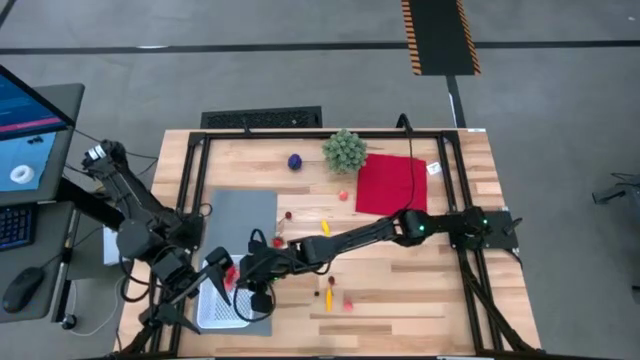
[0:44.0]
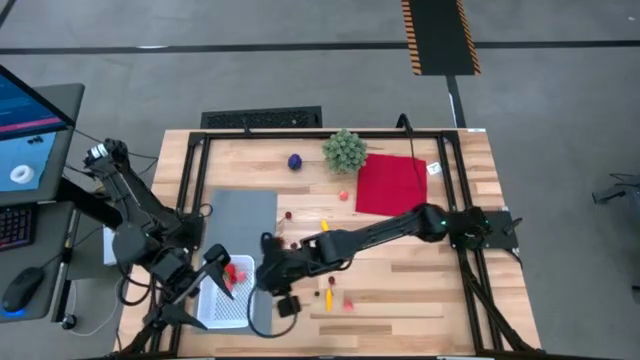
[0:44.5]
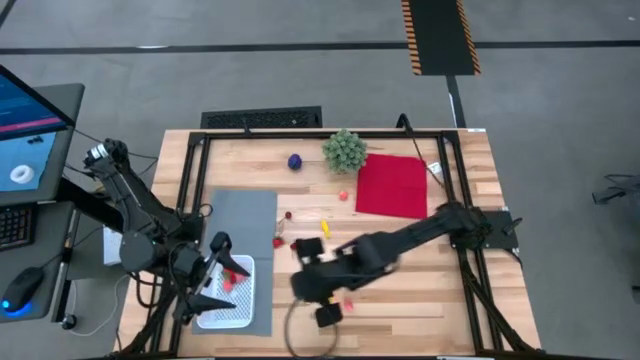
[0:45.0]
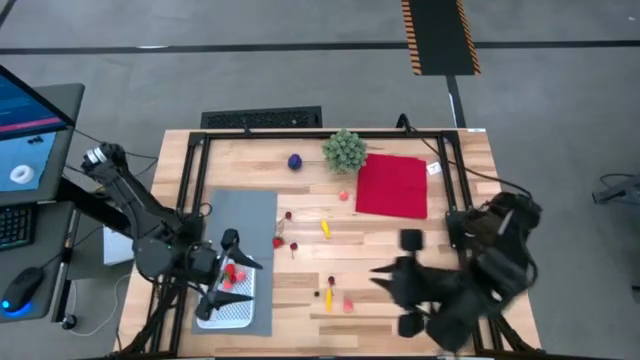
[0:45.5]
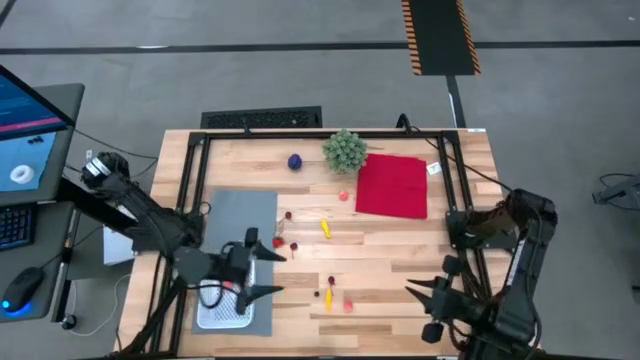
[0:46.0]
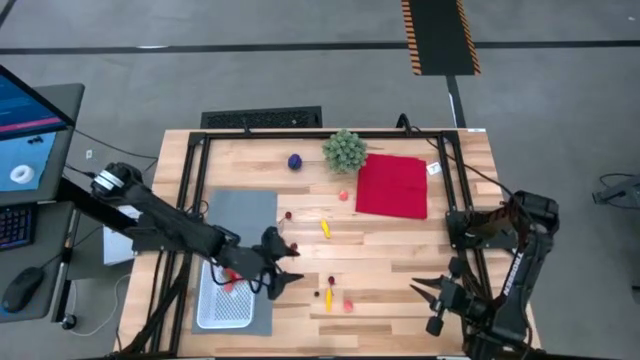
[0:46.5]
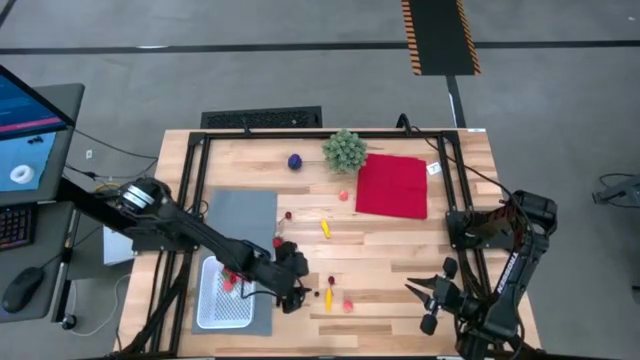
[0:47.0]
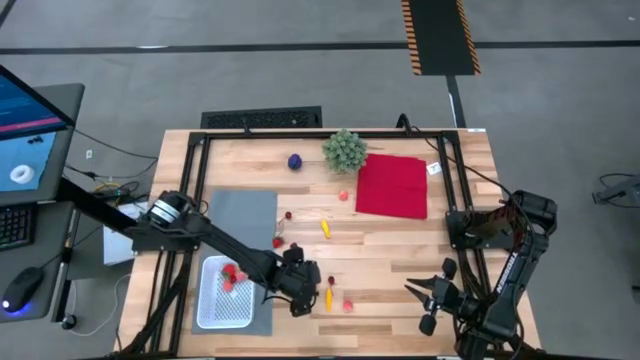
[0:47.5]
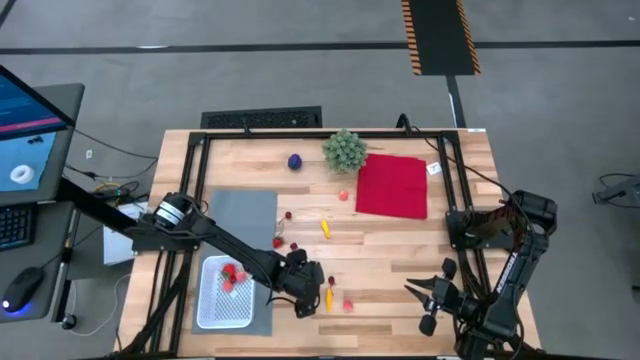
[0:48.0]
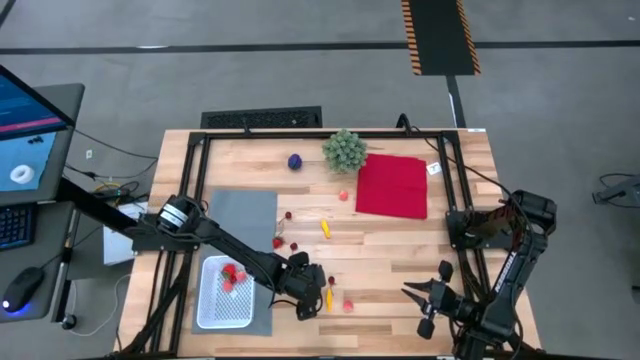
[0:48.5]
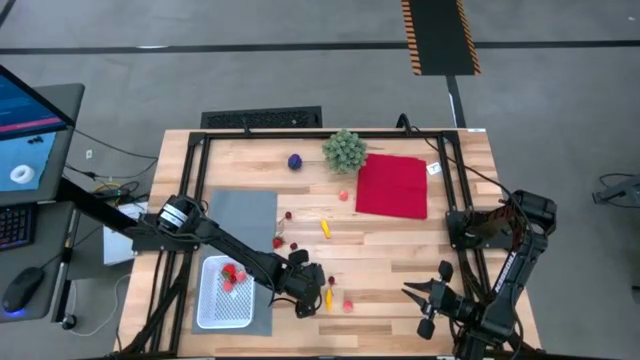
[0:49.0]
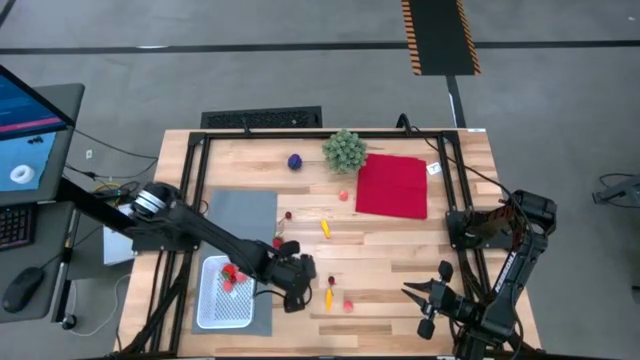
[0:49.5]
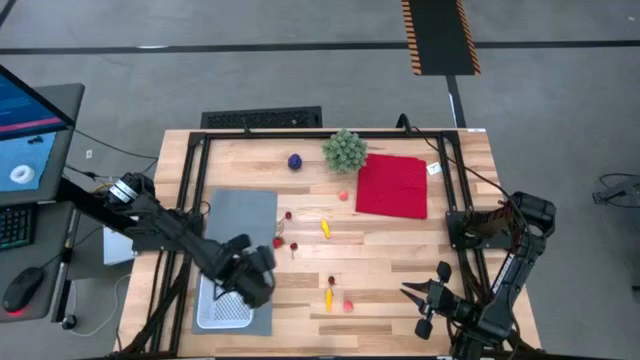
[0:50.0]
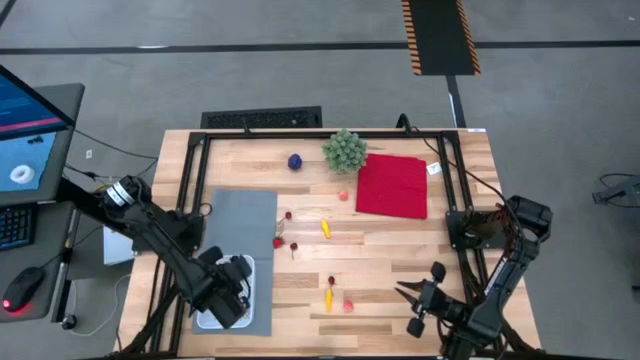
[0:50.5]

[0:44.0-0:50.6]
Task: Pick and placing Produce into tupperware
Put the blueberry into the white basket

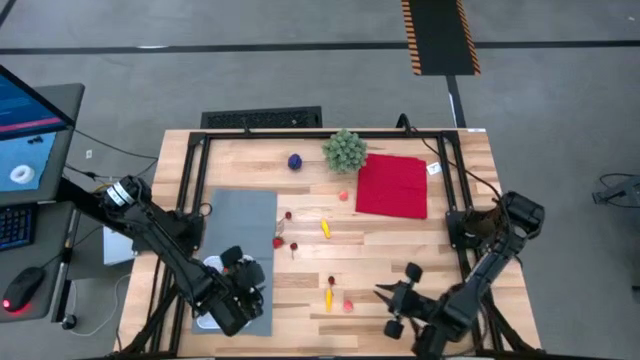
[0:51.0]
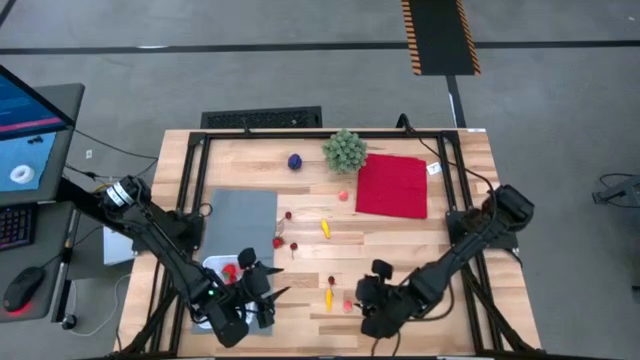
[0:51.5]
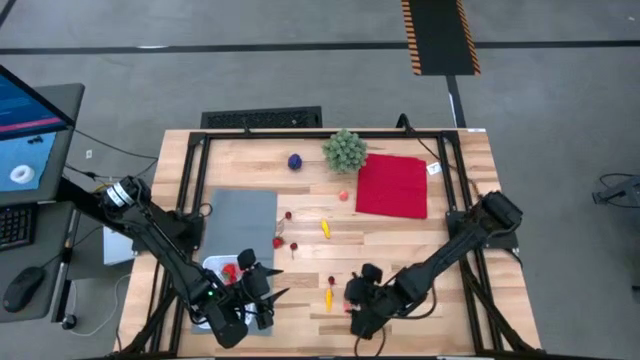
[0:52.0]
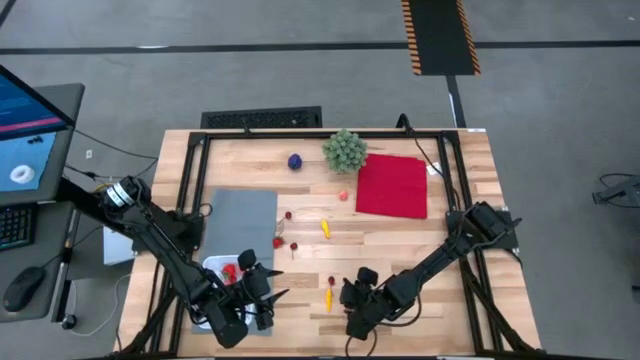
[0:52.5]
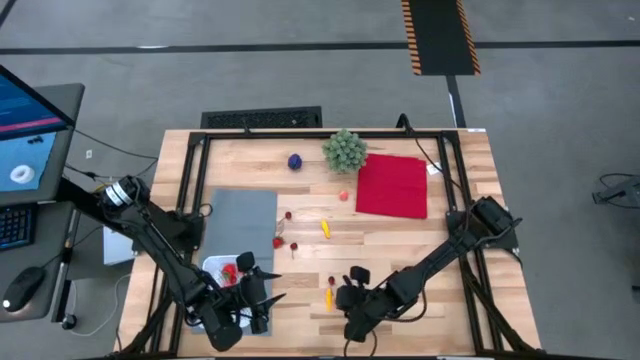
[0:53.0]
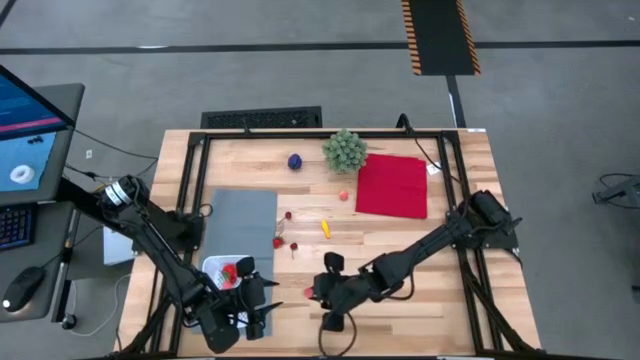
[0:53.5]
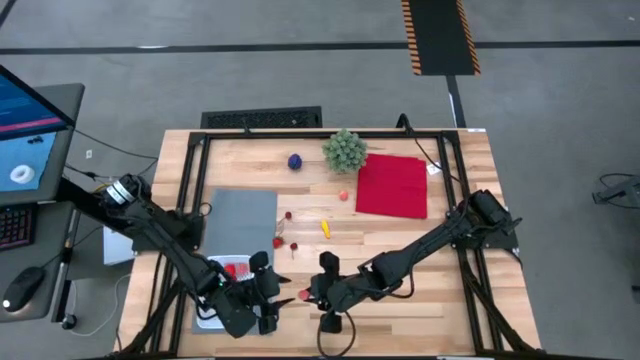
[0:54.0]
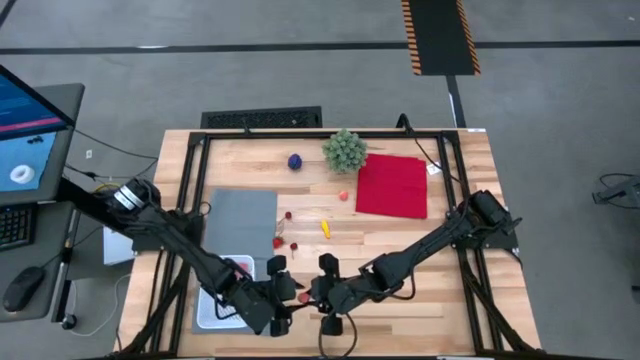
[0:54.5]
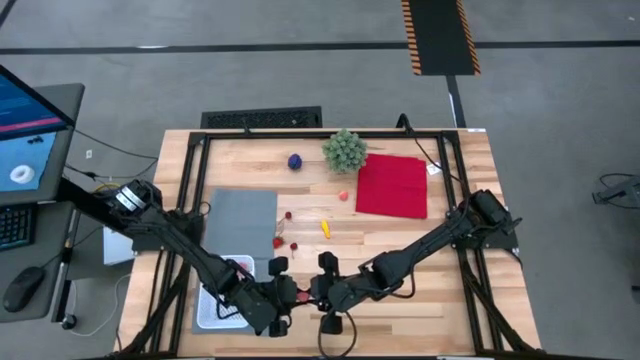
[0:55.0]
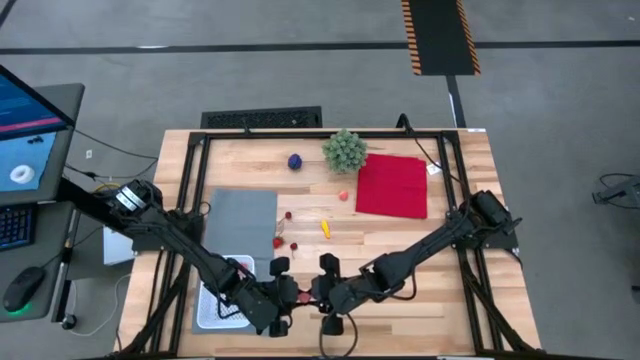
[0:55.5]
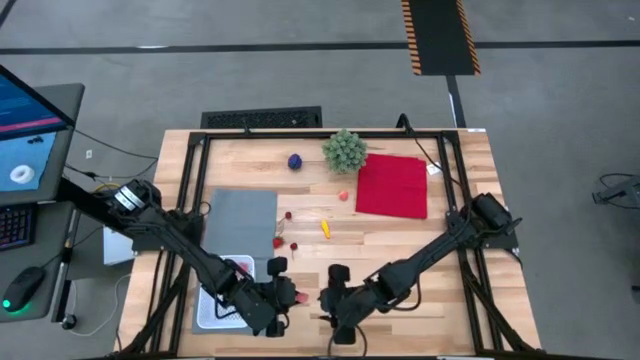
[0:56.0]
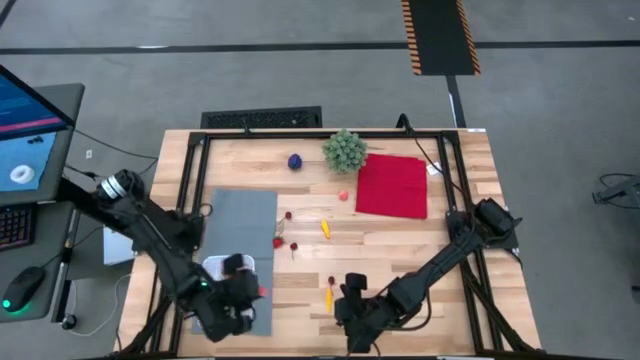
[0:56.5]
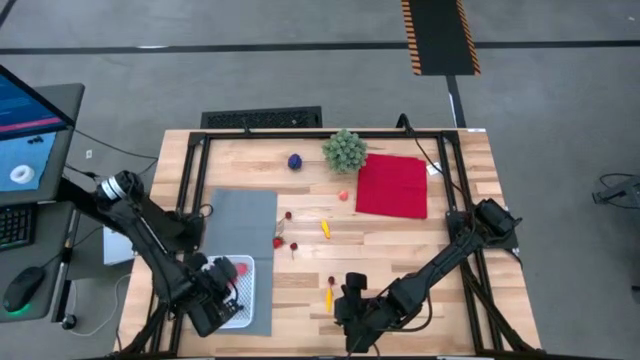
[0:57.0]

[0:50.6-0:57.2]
Put the pink apricot into the white basket

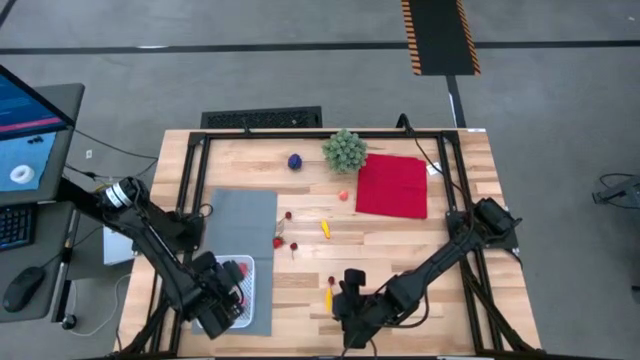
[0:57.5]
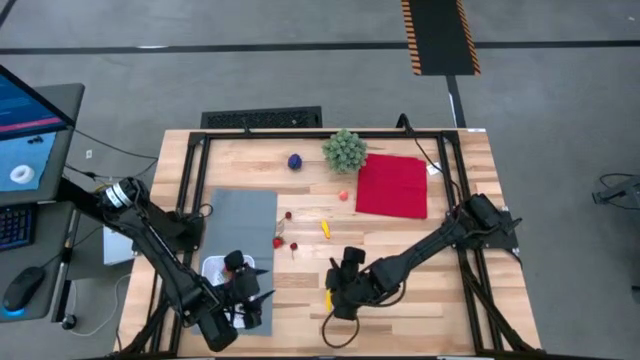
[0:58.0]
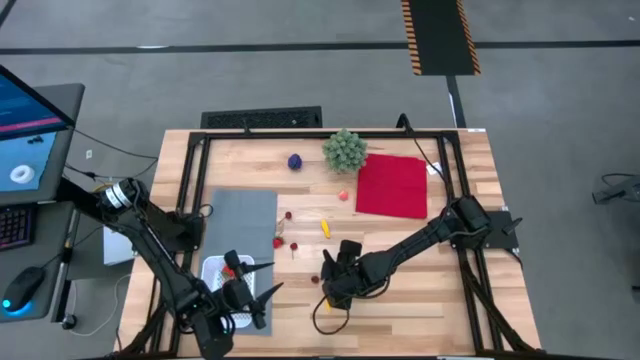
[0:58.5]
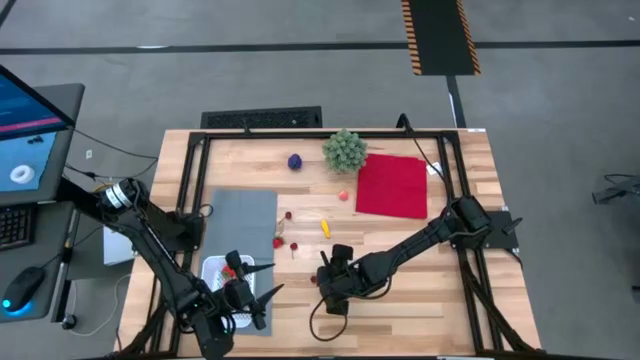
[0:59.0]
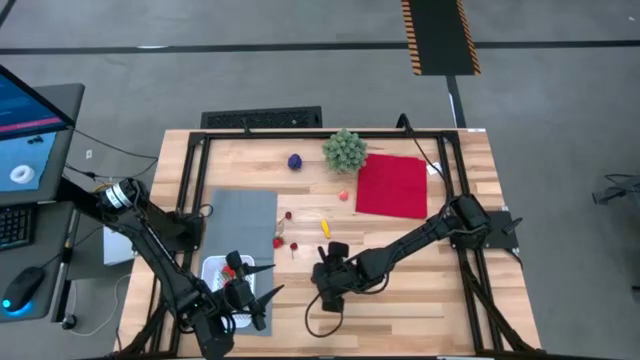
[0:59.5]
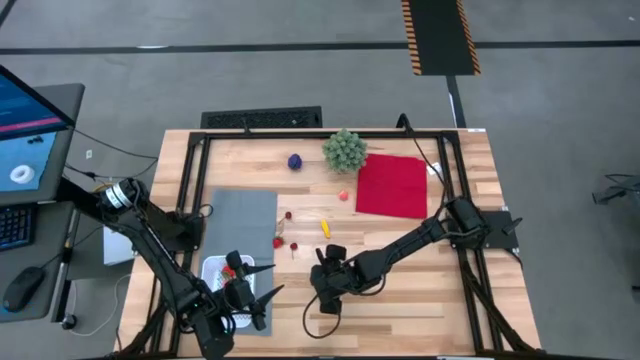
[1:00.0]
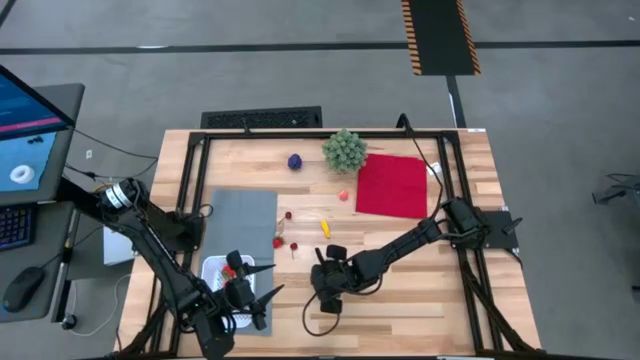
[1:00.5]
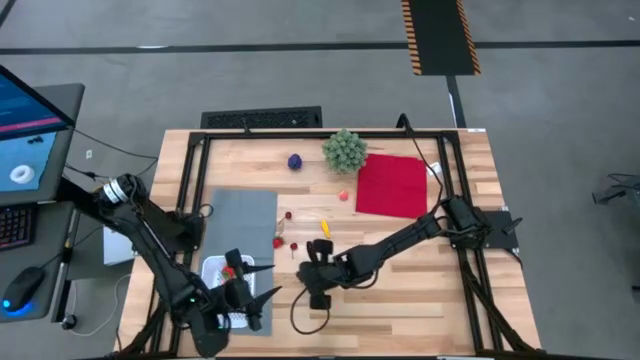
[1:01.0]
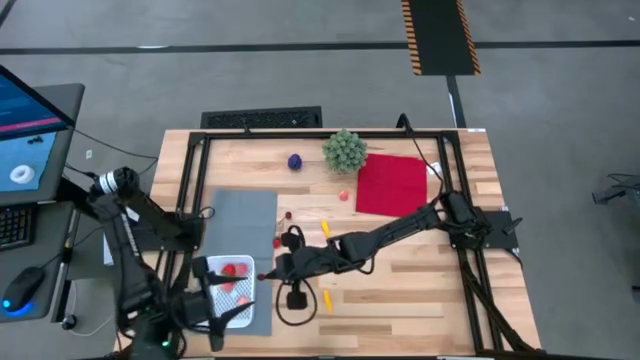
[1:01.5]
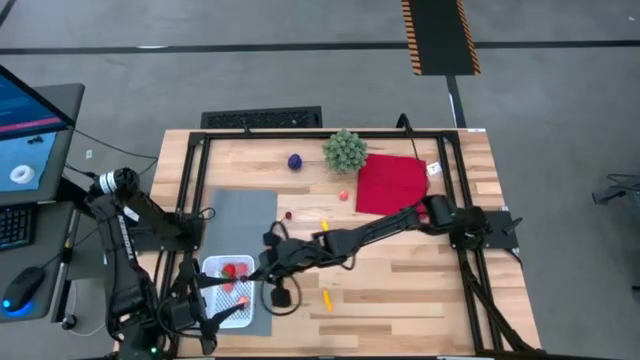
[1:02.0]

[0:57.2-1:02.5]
Put the red cherry into the white basket

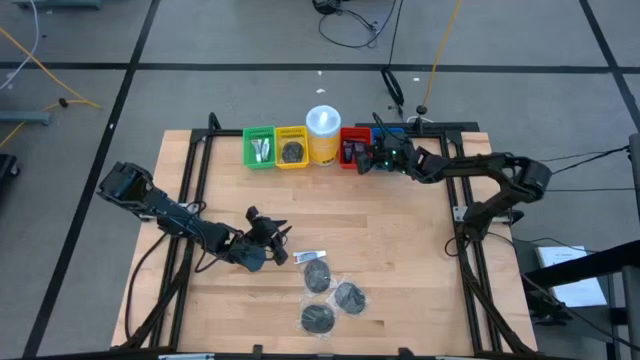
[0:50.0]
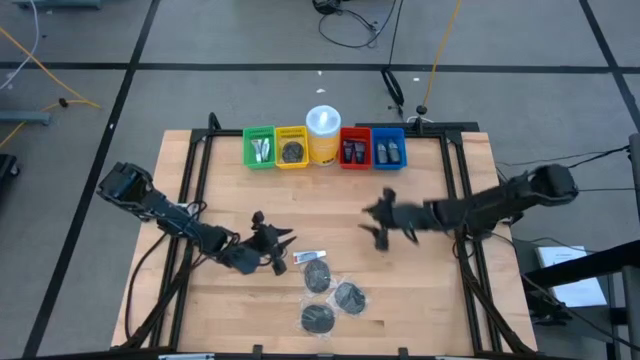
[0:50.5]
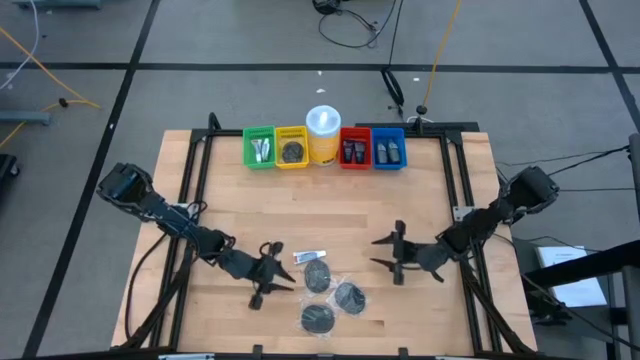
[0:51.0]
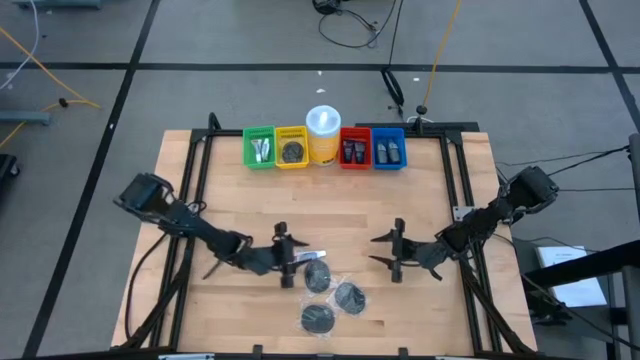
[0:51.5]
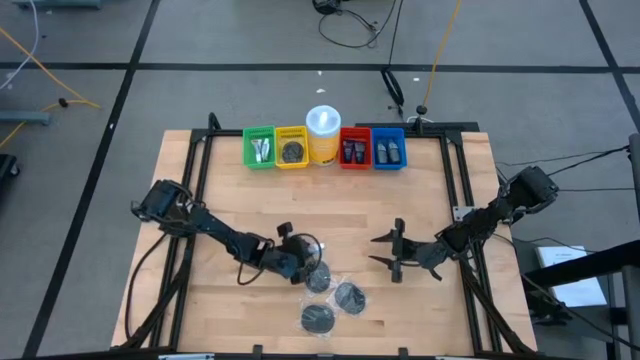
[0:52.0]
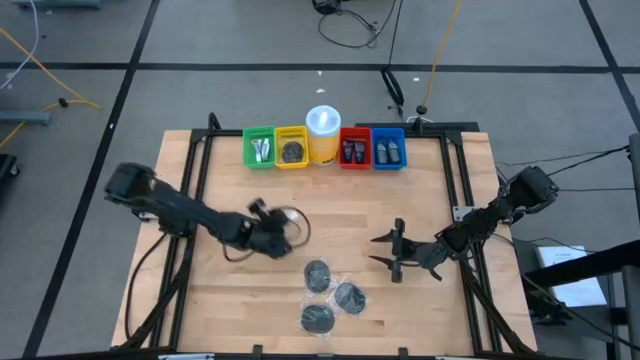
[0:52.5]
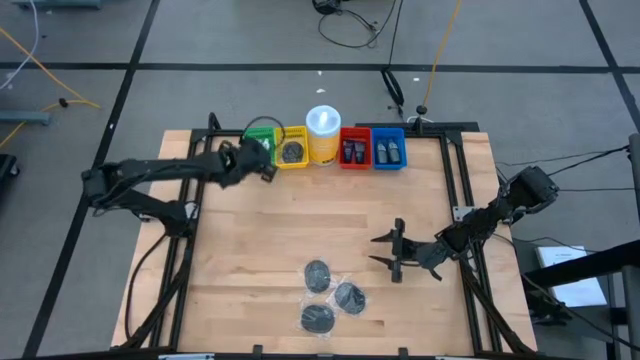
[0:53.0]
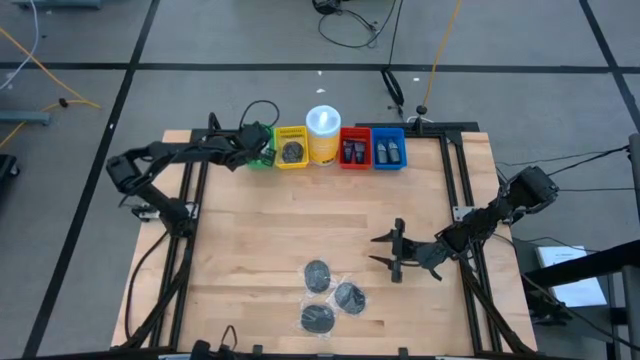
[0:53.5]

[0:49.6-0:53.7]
Task: Pick & Place Travel size toiletries
Put the white toothpaste into the green basket
